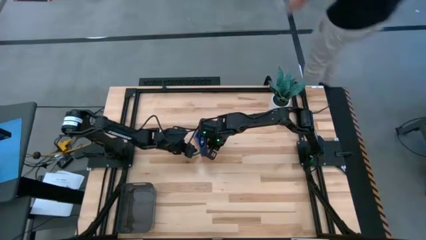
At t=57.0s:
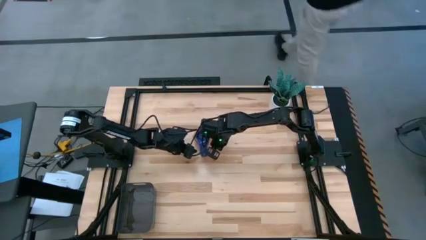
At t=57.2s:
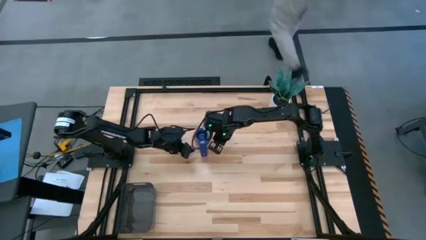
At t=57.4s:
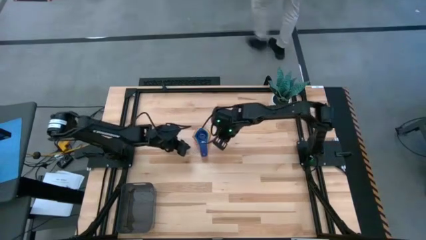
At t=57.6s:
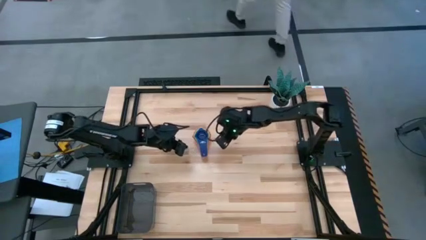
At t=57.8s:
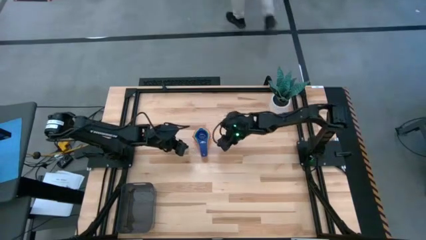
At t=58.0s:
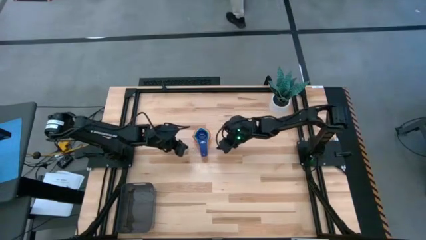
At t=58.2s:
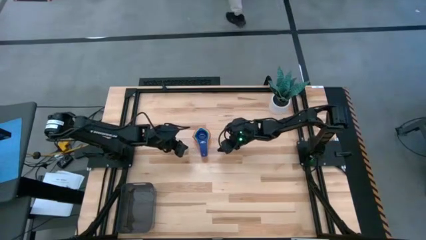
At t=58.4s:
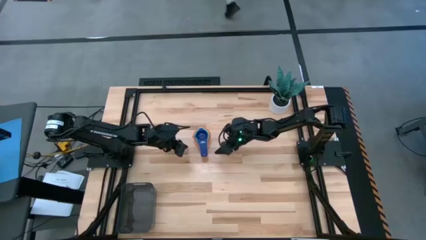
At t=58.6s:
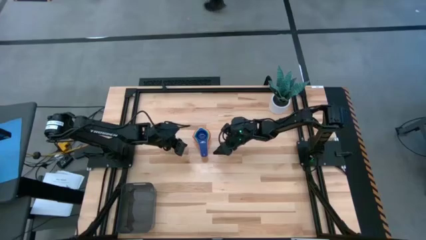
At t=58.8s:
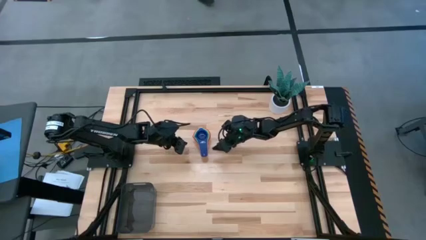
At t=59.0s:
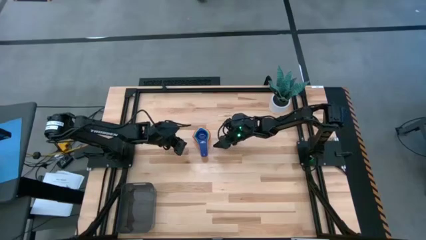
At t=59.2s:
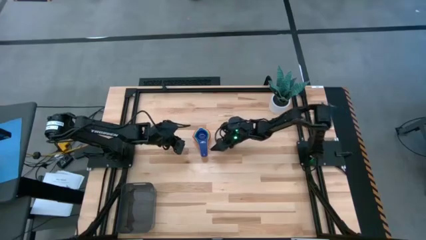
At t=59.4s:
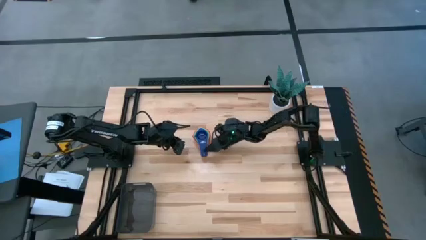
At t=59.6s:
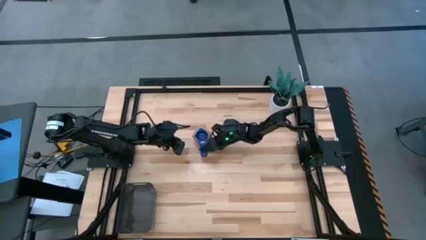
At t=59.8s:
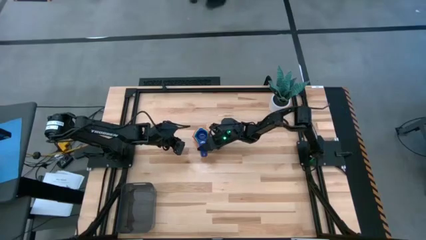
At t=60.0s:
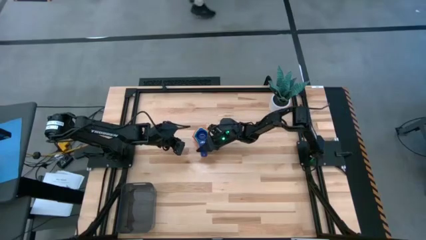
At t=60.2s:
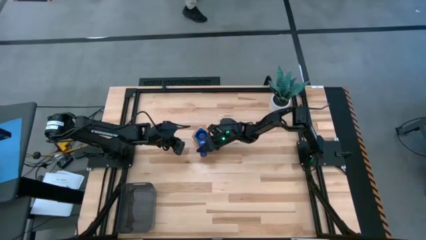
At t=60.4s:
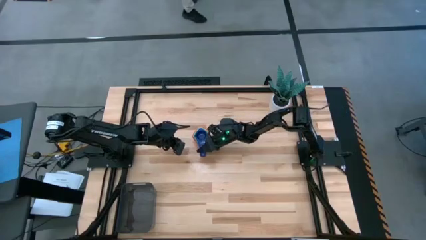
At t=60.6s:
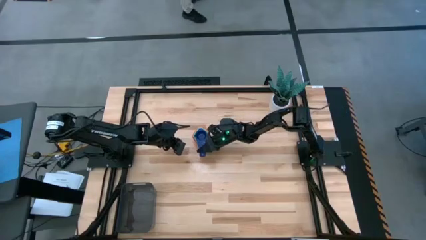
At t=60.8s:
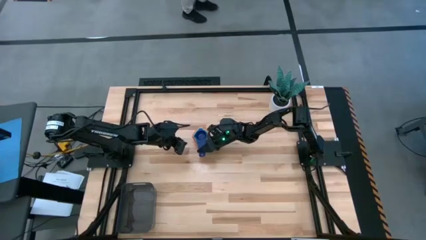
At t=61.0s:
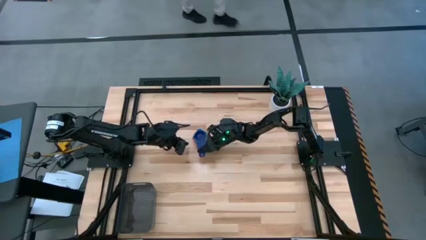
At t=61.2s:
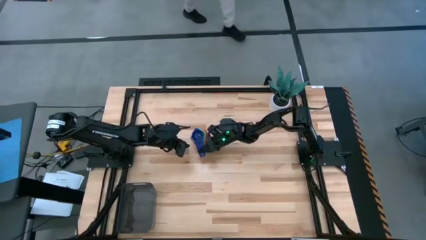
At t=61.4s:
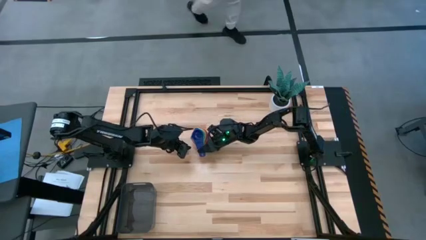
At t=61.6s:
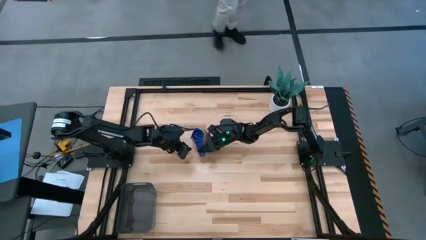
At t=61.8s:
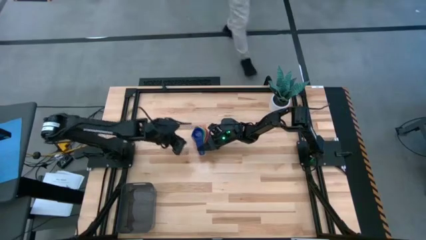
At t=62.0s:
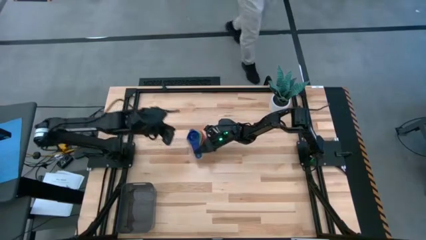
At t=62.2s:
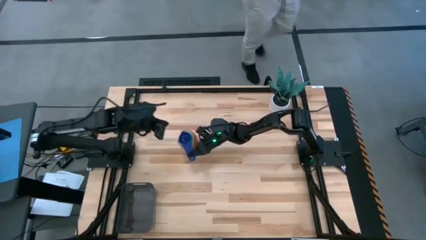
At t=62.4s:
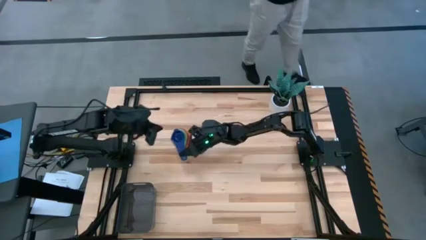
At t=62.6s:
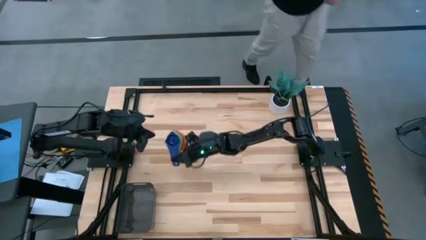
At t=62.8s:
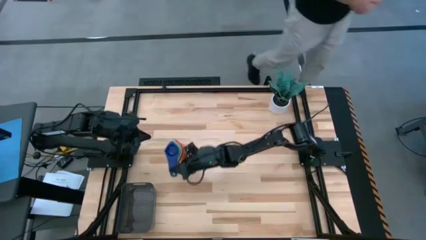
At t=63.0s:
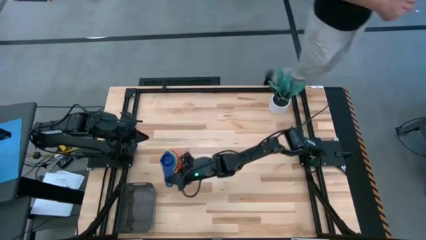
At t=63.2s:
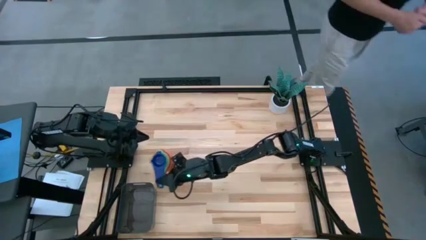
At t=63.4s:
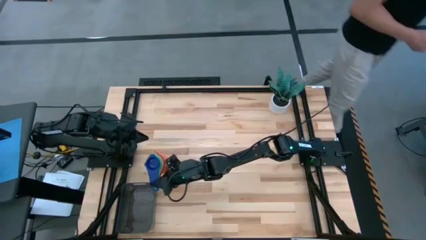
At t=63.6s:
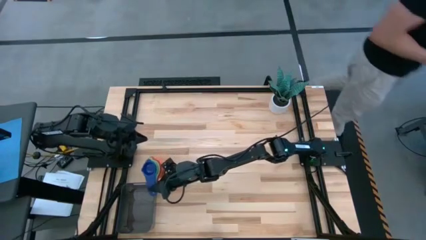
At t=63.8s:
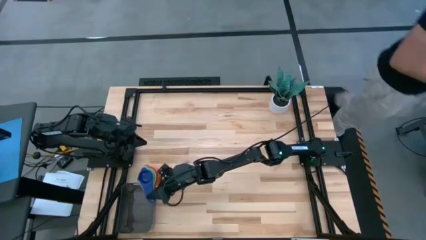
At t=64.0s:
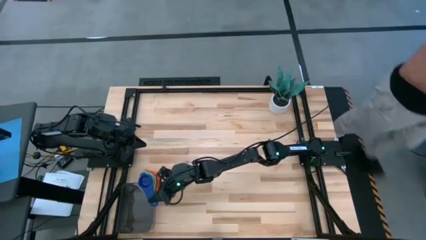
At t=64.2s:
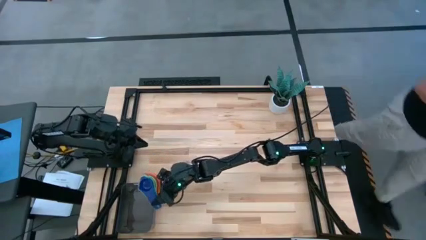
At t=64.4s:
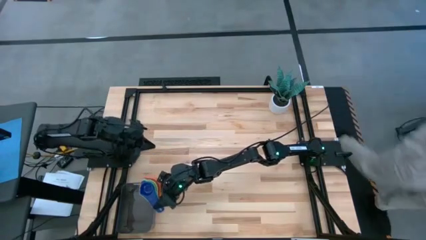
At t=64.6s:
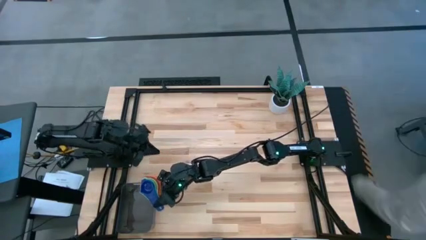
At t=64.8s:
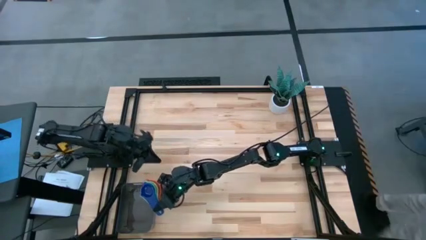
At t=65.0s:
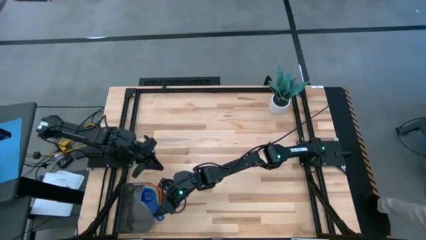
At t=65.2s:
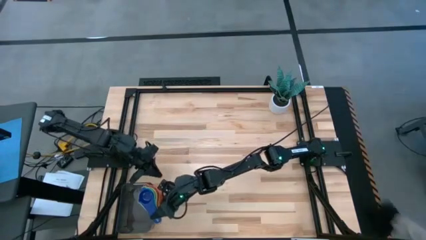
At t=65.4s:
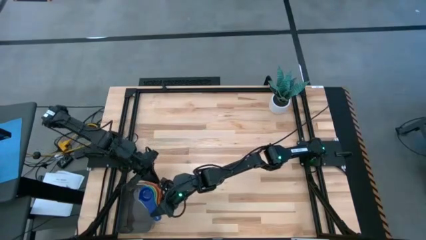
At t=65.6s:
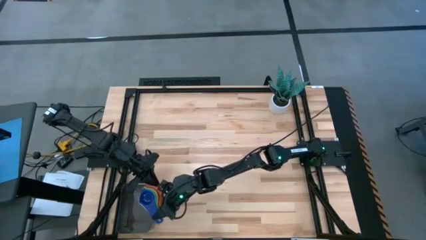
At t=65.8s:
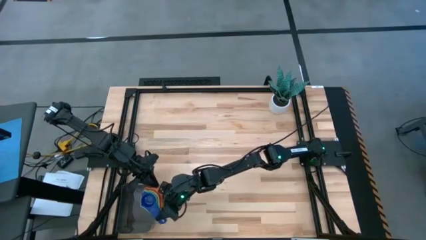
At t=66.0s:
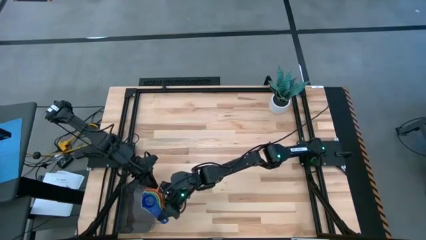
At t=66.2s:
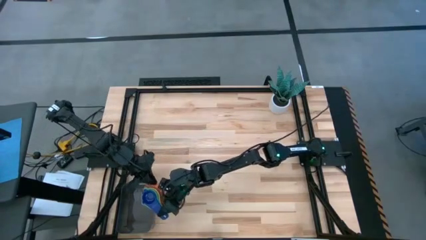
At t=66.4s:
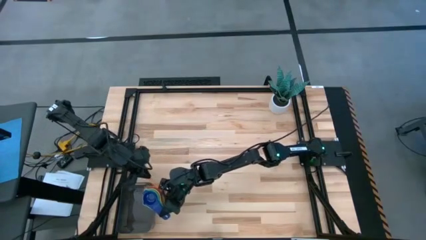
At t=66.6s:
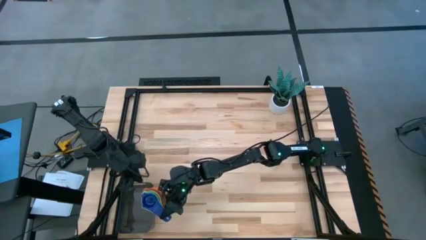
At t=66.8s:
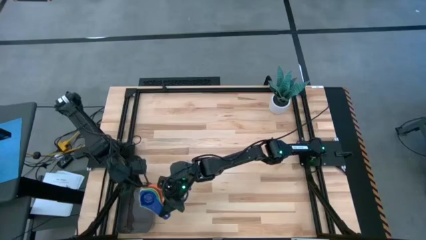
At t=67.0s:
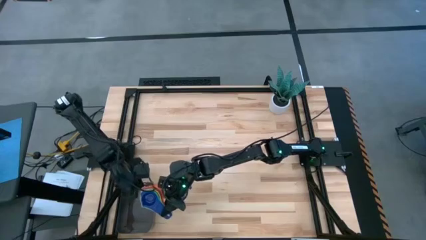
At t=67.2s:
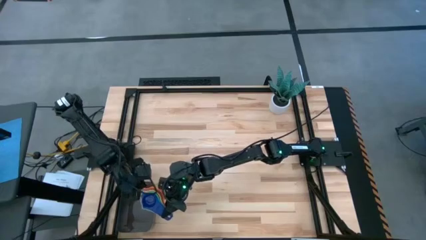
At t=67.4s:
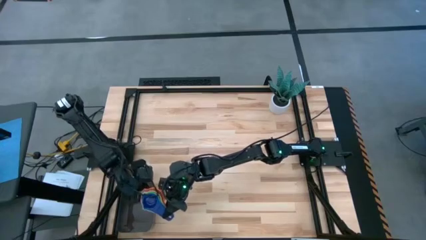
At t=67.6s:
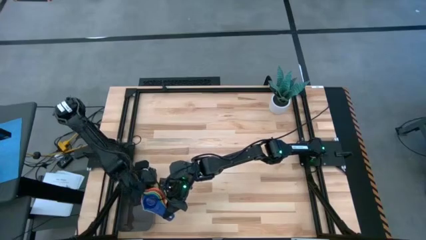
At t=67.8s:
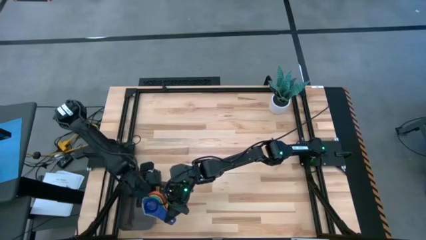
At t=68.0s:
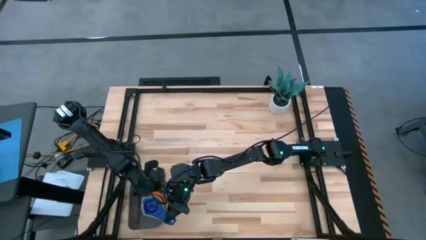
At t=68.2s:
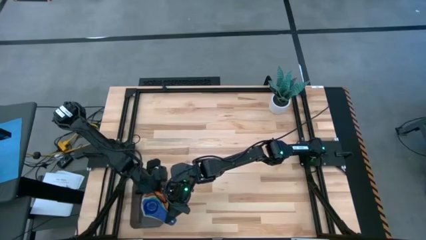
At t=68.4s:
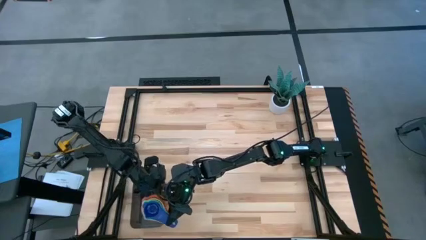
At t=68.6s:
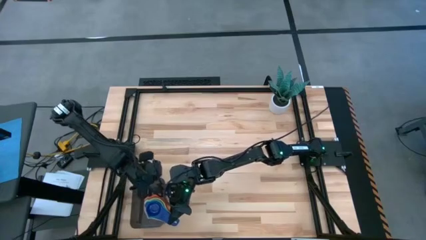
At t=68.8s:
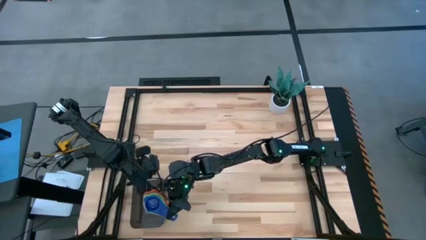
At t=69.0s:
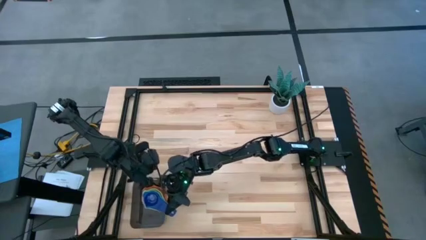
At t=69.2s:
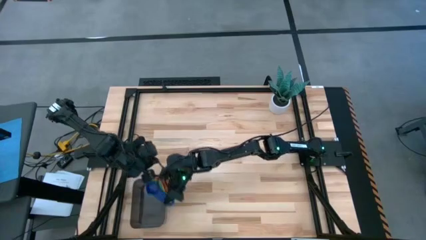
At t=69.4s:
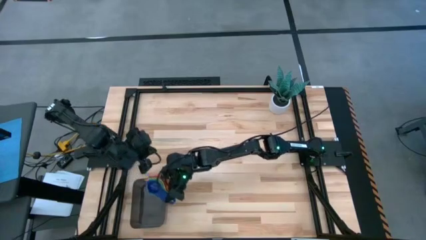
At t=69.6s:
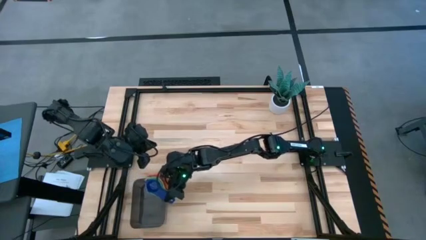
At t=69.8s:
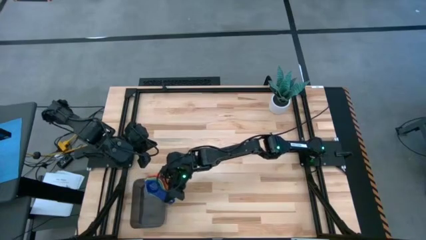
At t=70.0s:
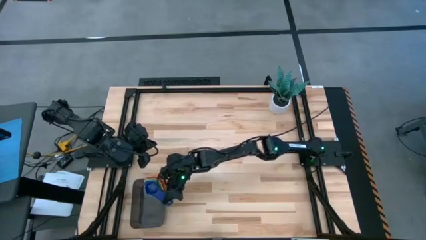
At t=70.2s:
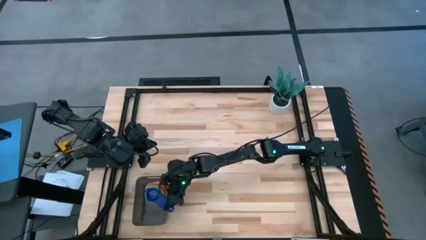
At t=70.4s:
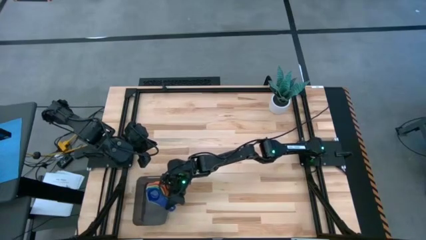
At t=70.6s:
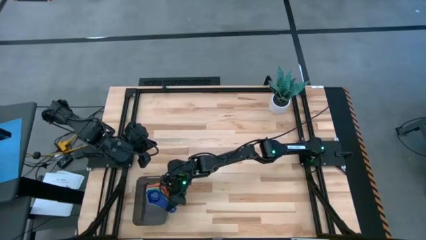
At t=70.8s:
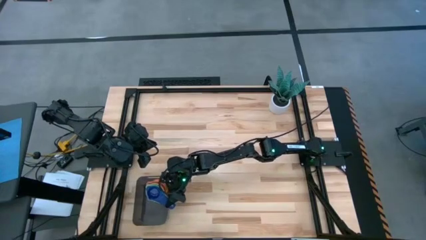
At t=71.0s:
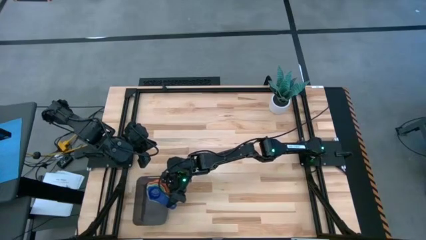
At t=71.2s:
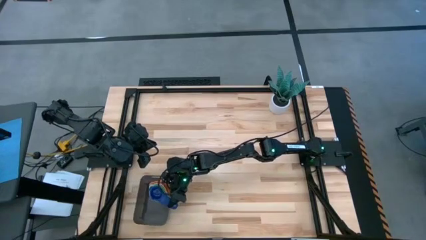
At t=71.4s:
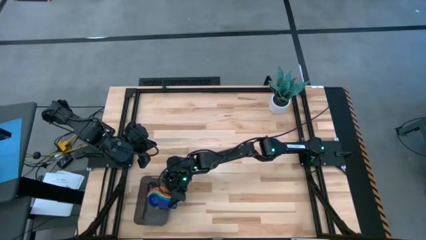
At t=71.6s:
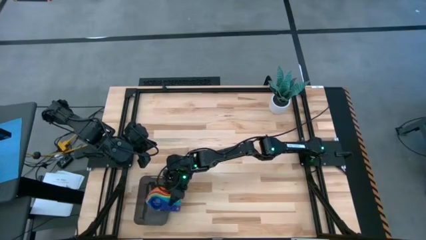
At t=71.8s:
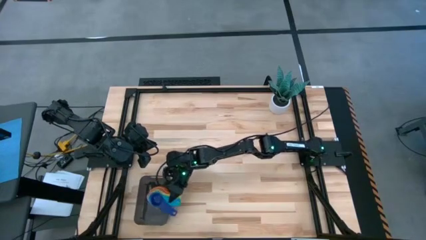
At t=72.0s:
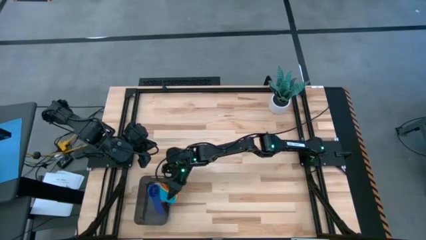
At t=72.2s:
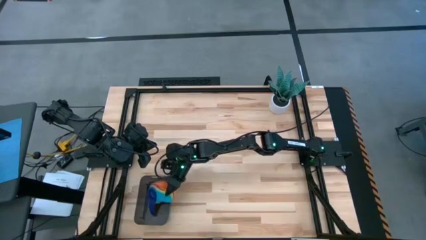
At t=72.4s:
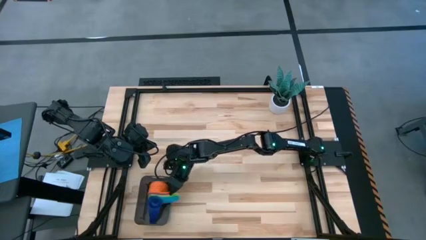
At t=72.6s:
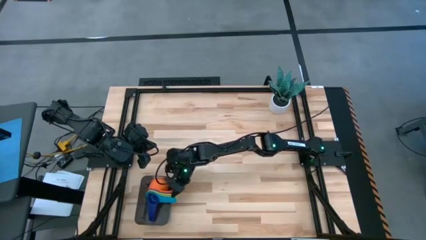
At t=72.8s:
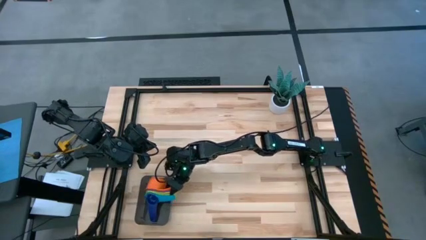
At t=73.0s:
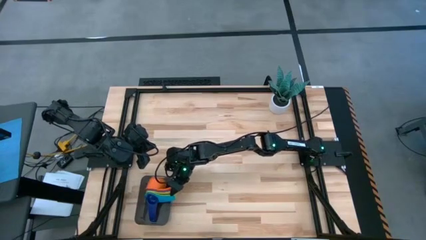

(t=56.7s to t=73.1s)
Task: Nest measuring cups in basket
Put the measuring cups on top of the black bin
